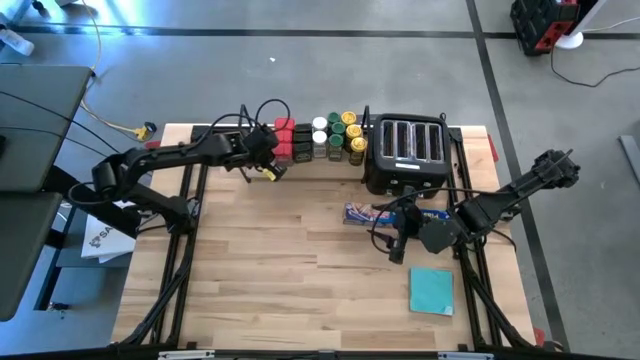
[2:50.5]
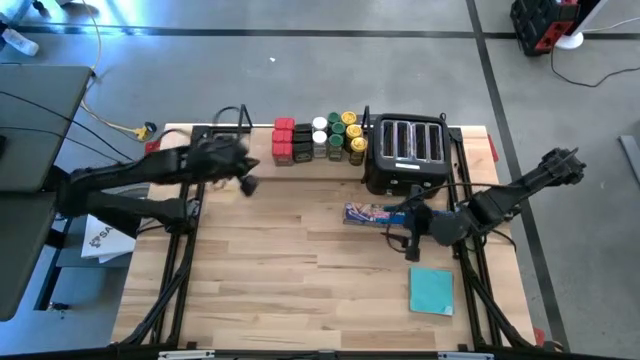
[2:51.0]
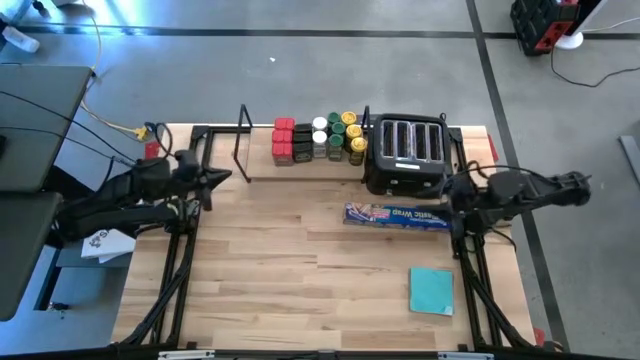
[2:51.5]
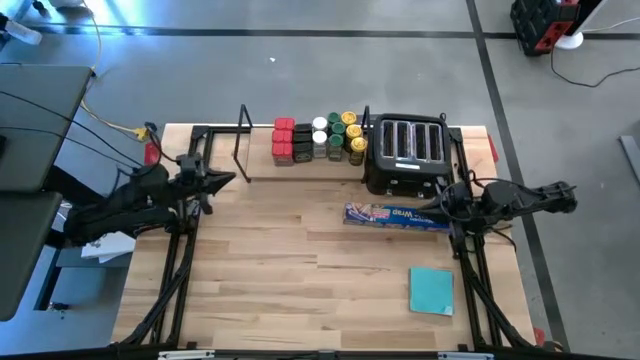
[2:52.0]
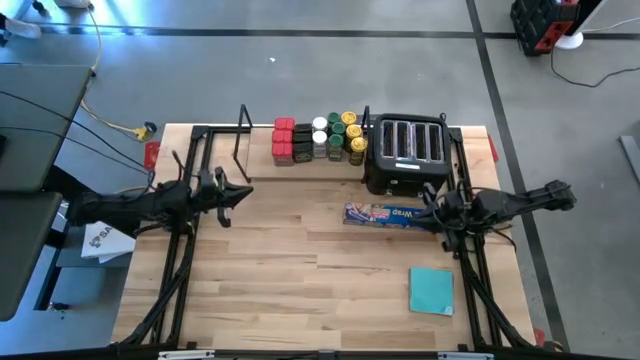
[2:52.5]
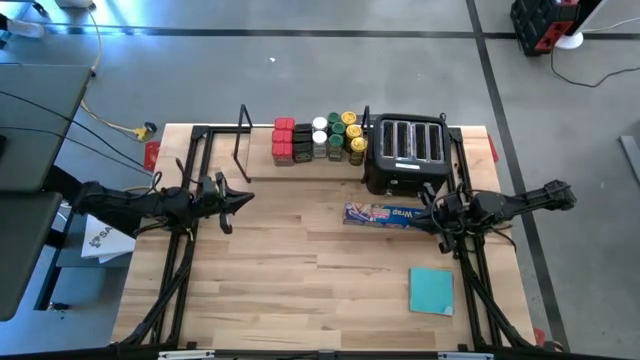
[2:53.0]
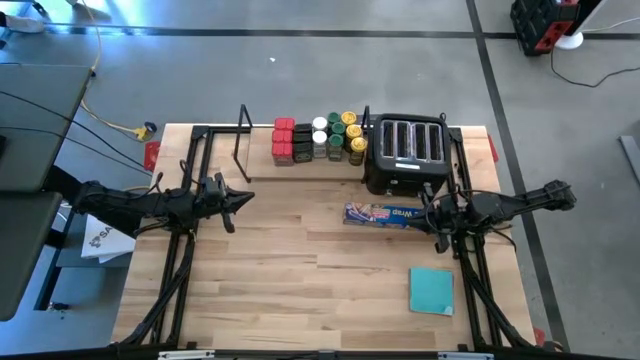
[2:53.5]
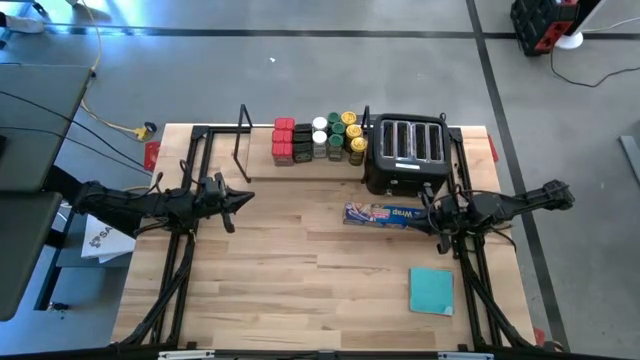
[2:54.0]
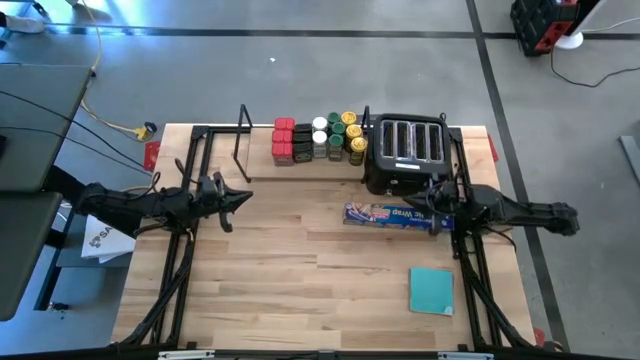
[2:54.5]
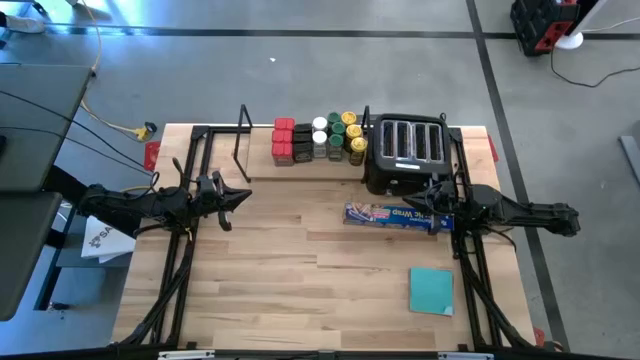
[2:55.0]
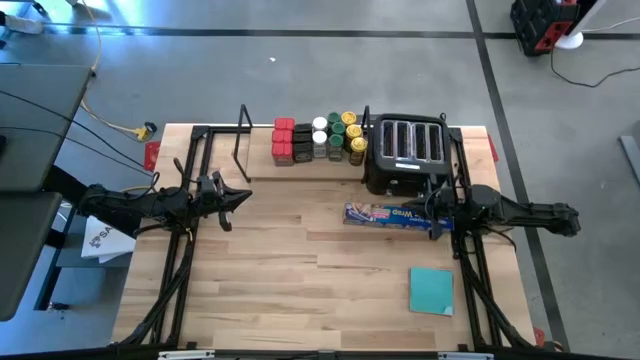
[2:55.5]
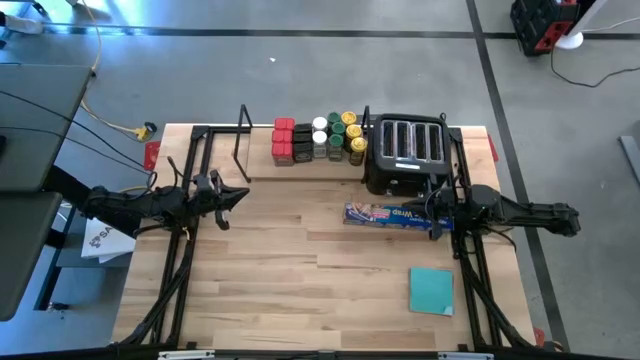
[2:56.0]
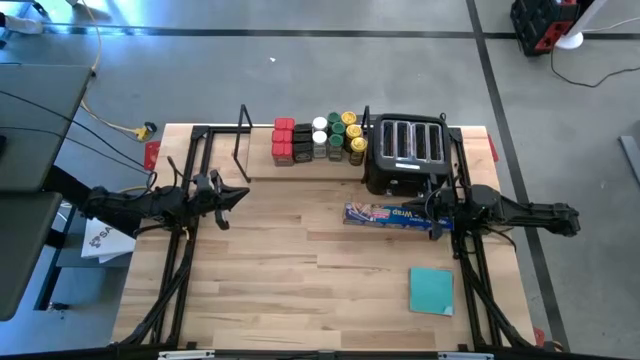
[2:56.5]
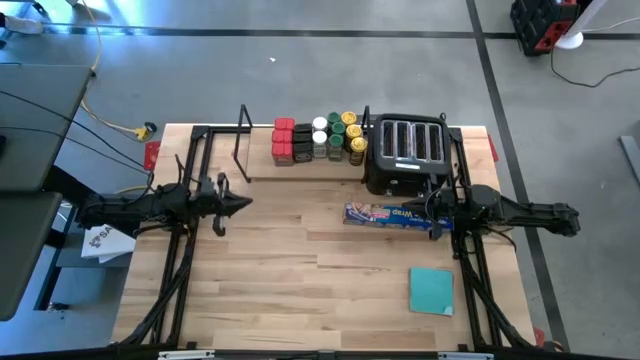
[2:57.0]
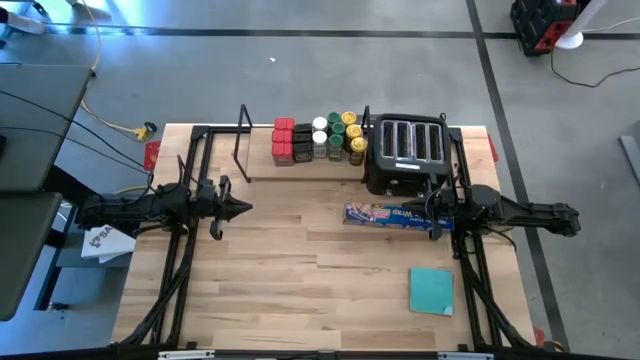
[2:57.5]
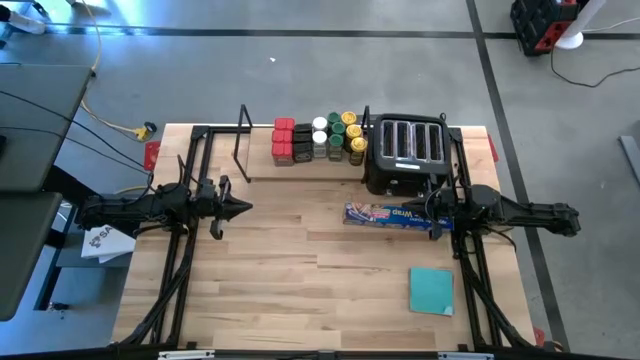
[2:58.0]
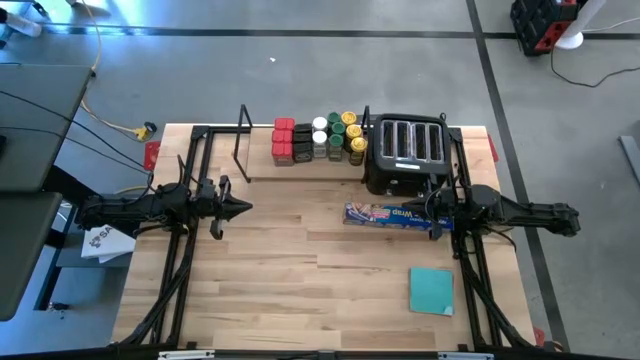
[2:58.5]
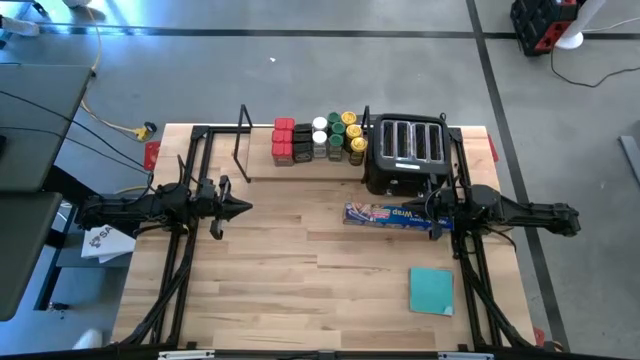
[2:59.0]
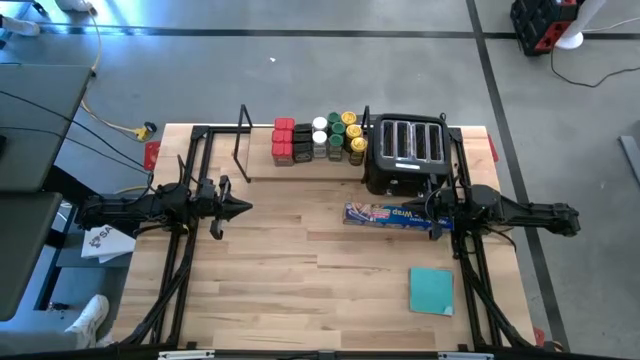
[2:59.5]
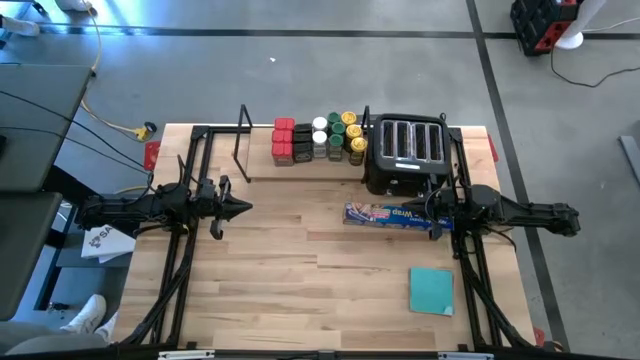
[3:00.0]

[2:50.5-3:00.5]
Task: Shelf spices
Return to Home Position

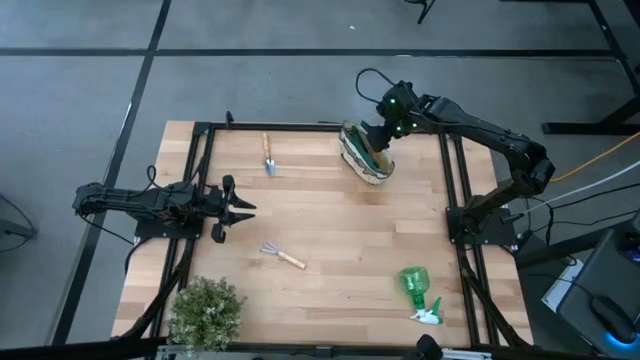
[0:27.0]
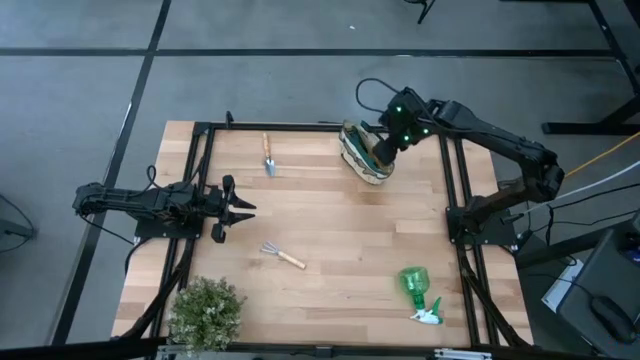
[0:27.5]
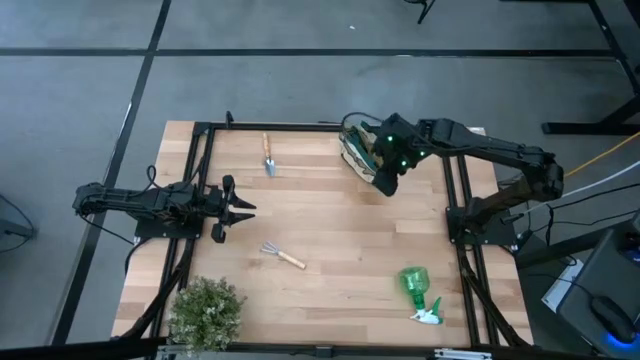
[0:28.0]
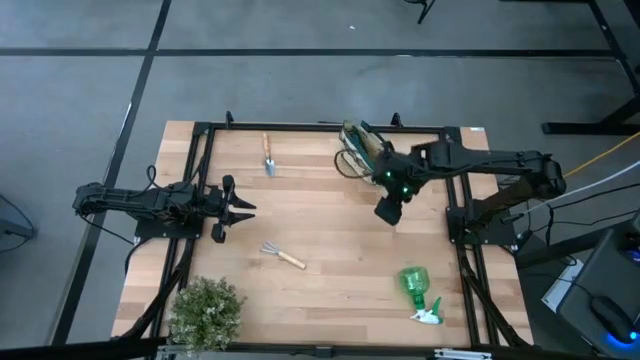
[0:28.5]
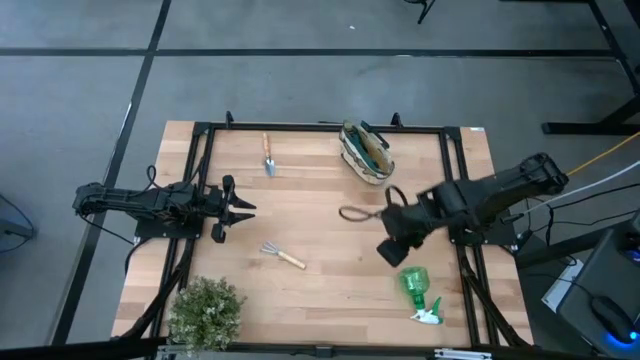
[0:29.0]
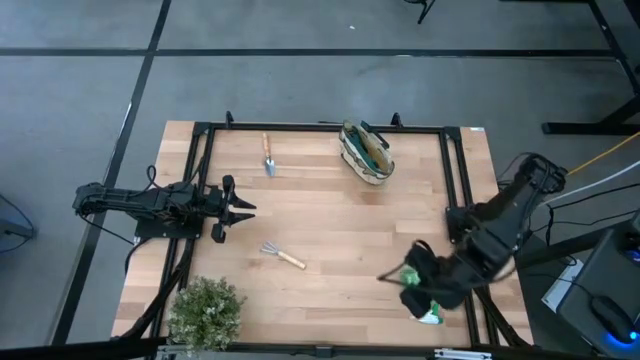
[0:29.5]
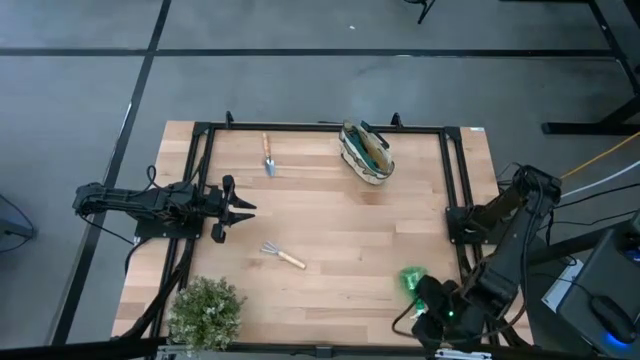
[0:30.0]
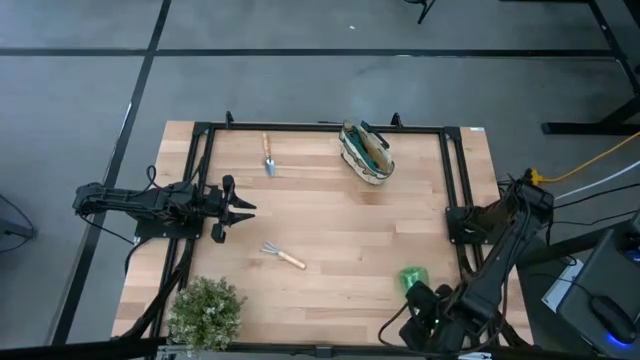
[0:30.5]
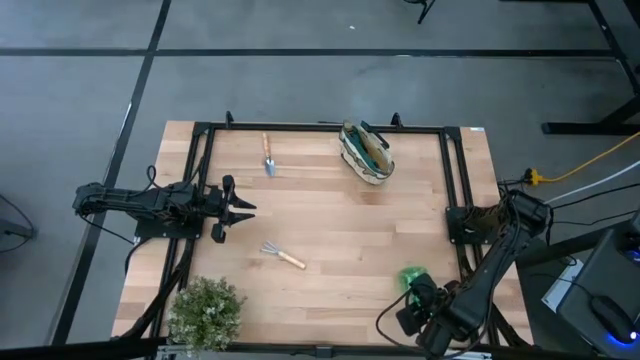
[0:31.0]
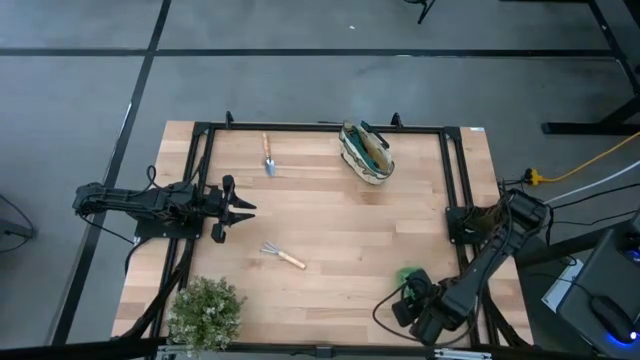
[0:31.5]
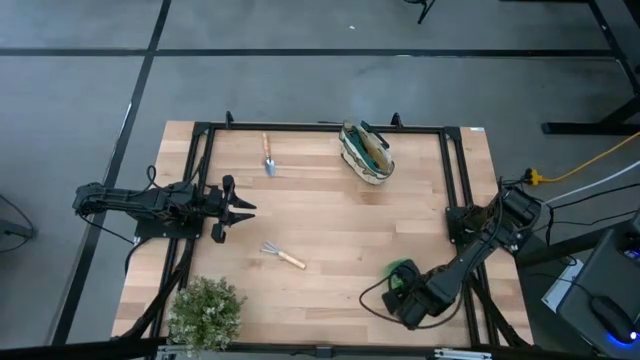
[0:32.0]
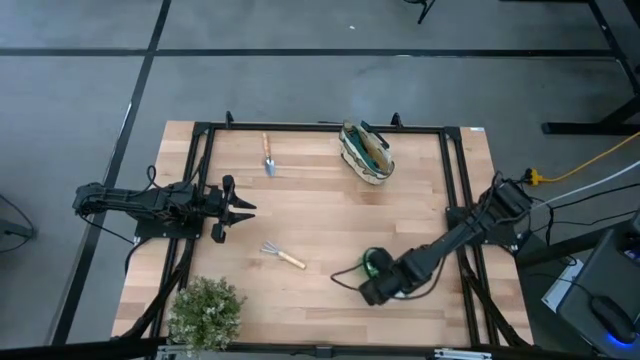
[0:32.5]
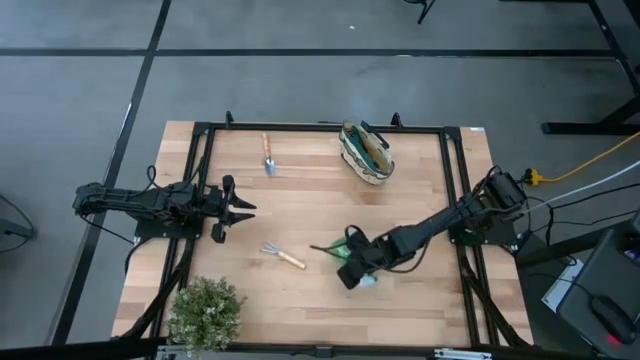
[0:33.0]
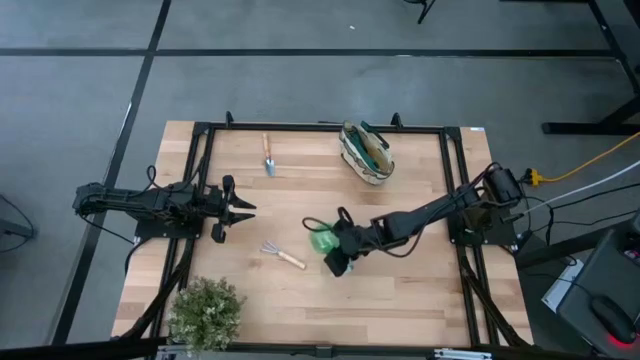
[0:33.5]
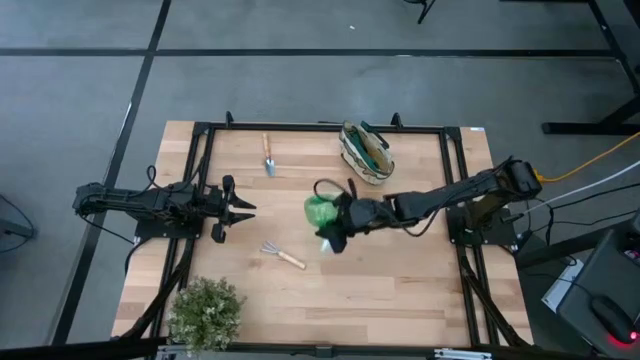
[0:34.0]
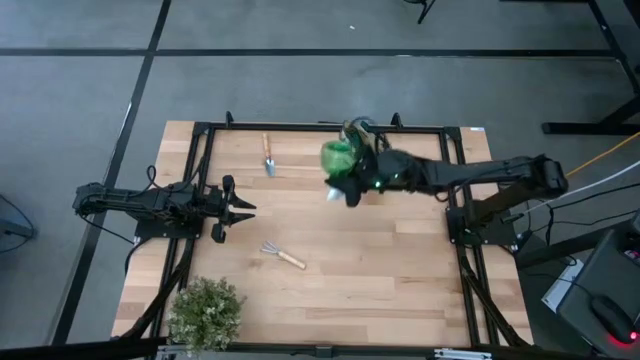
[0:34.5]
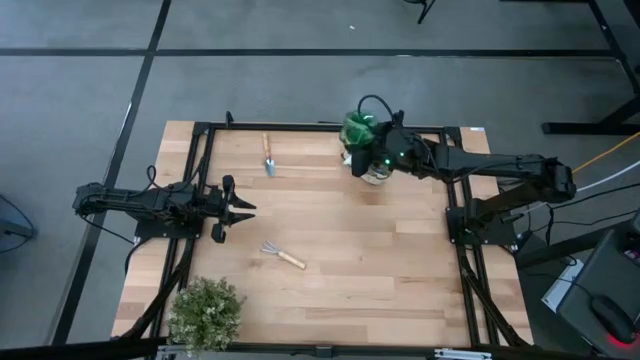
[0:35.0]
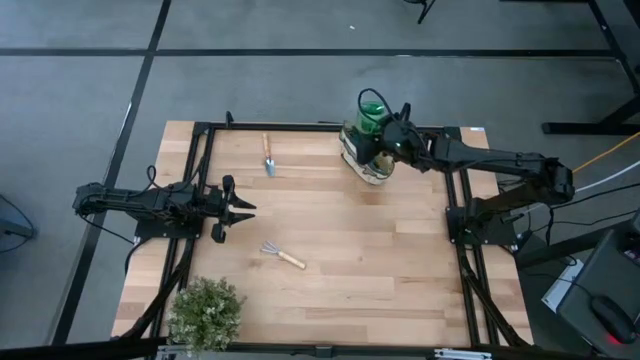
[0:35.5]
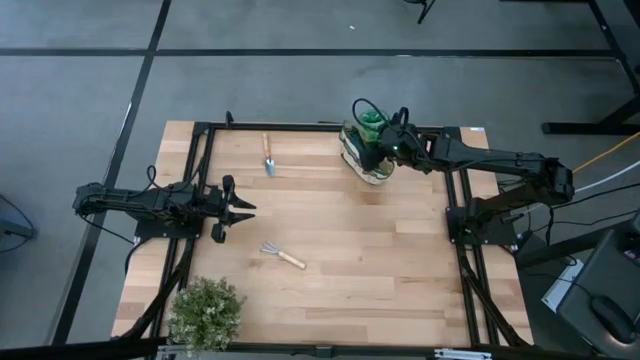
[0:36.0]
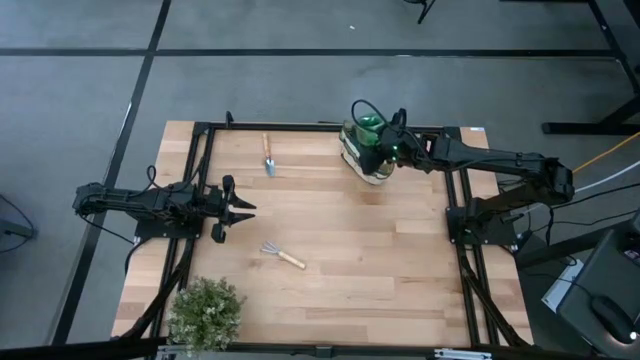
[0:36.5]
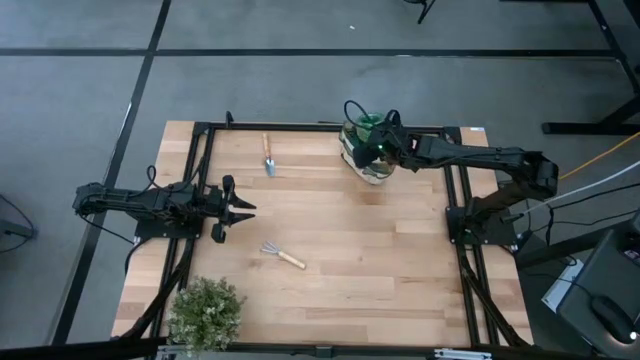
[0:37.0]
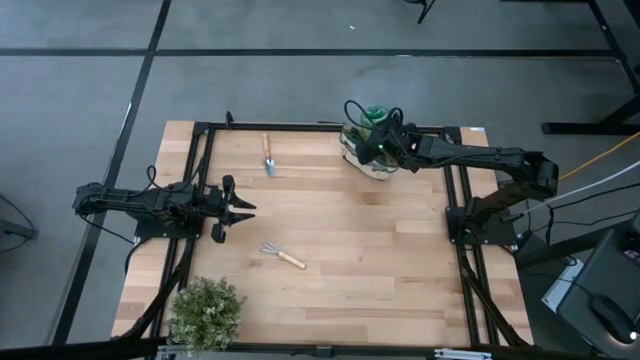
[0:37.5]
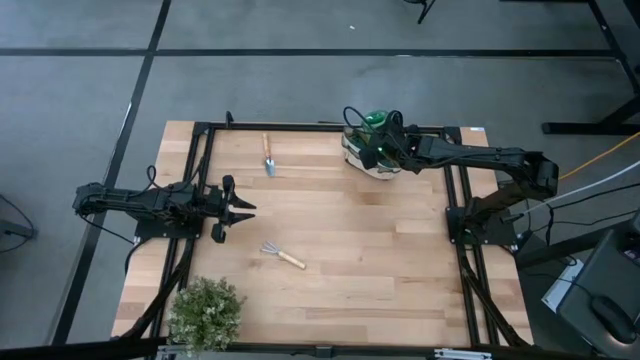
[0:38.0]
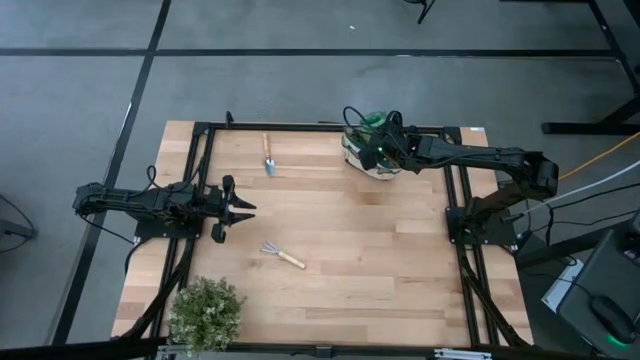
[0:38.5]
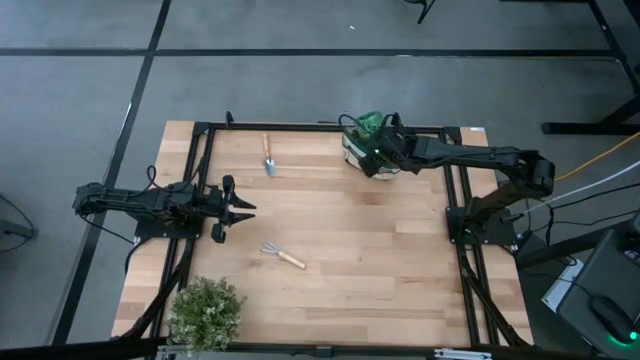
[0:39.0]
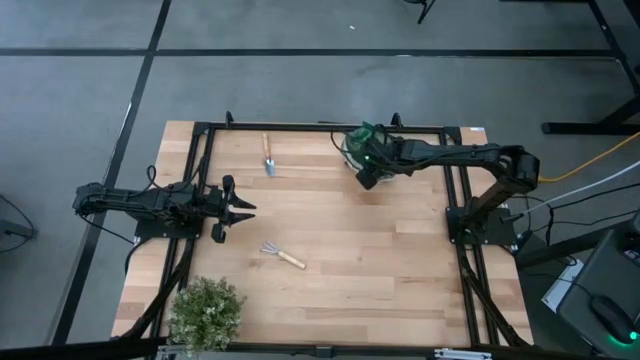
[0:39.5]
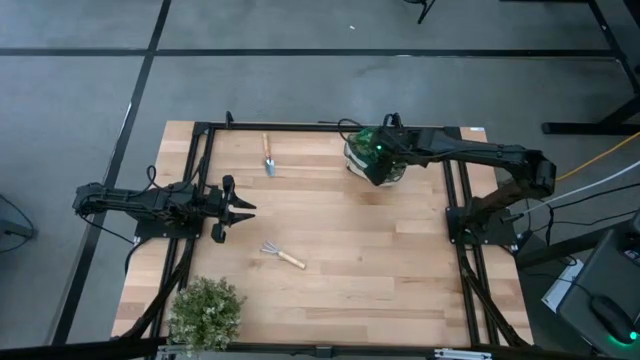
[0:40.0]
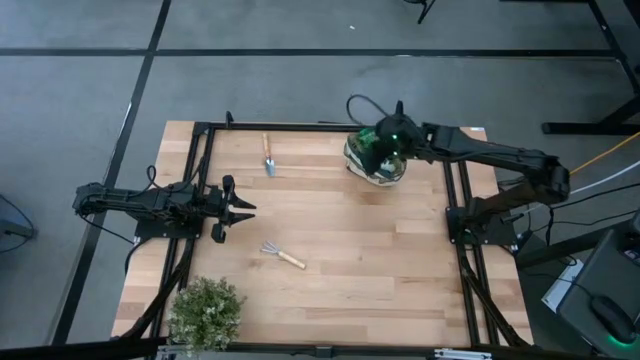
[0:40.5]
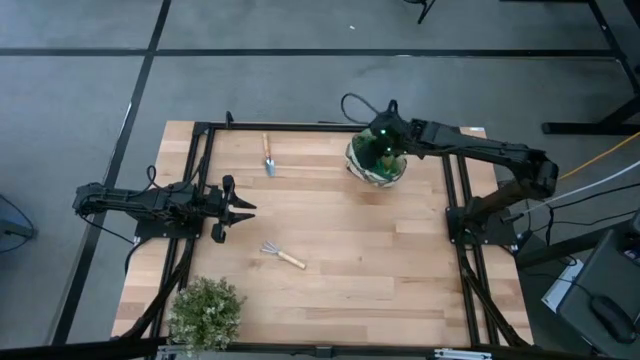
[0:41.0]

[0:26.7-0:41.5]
Task: Pick & Place Garden tools in Gardening bag
Put the spray bottle into the white bag
